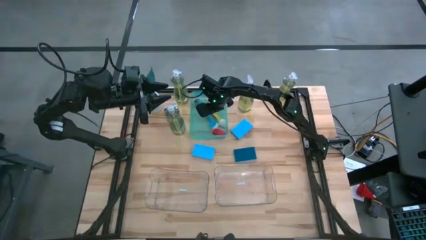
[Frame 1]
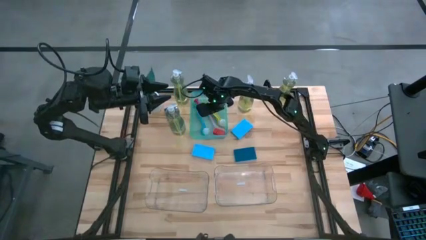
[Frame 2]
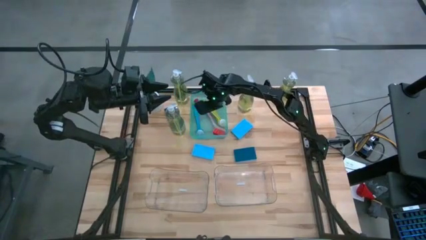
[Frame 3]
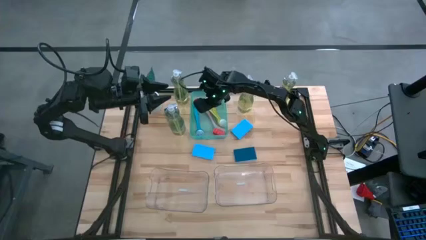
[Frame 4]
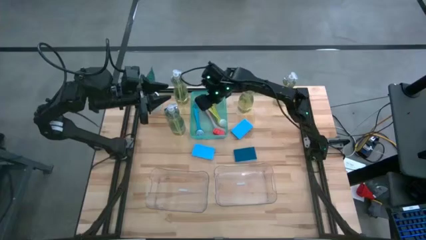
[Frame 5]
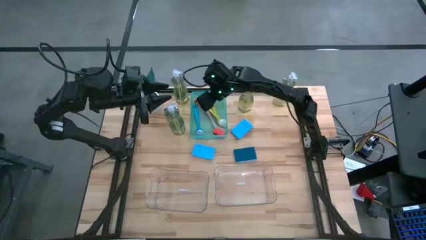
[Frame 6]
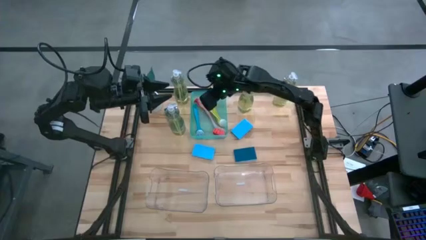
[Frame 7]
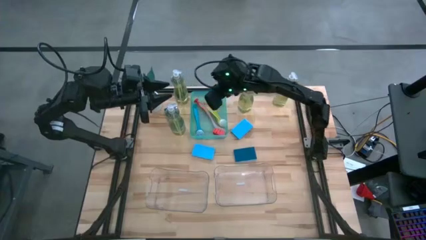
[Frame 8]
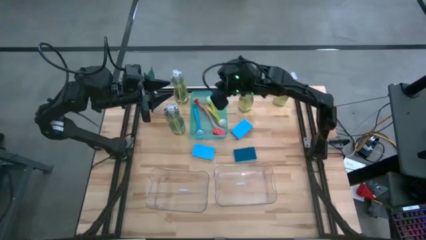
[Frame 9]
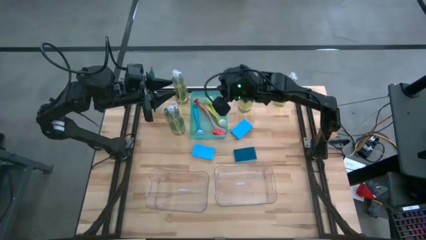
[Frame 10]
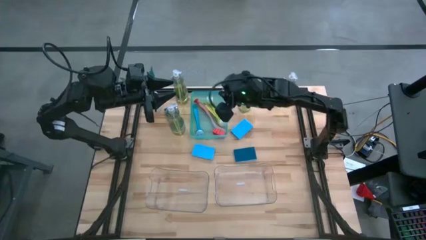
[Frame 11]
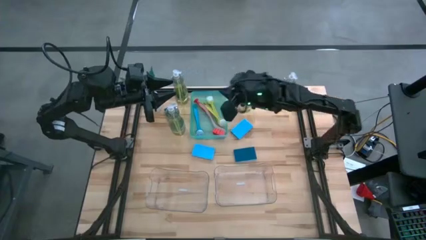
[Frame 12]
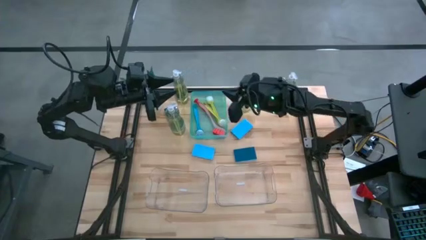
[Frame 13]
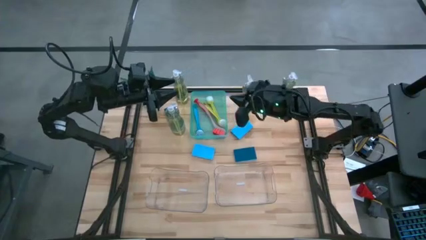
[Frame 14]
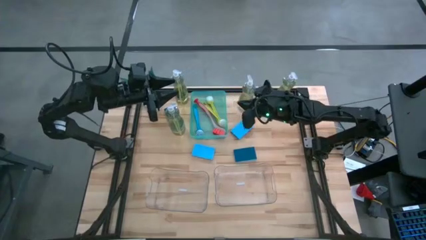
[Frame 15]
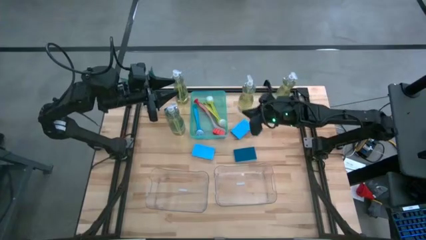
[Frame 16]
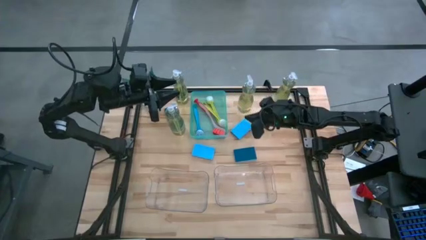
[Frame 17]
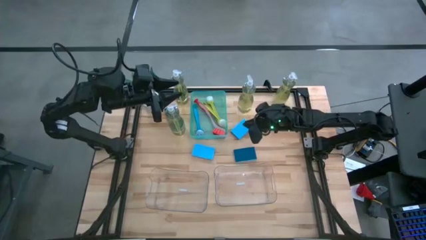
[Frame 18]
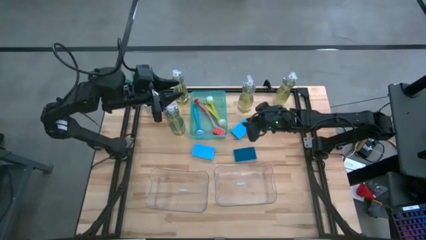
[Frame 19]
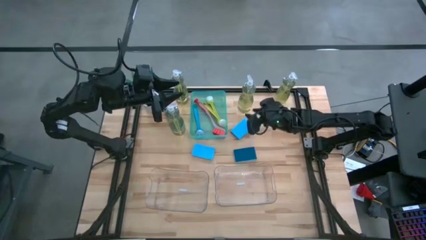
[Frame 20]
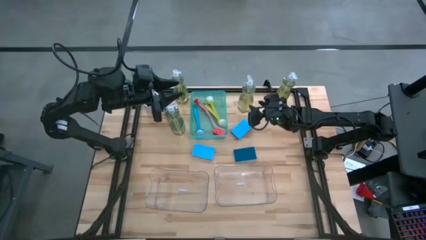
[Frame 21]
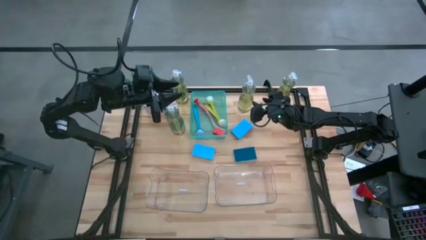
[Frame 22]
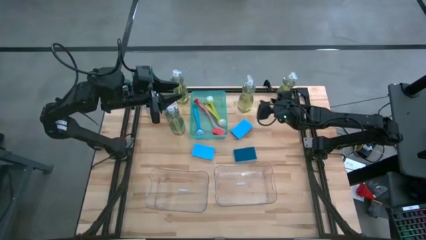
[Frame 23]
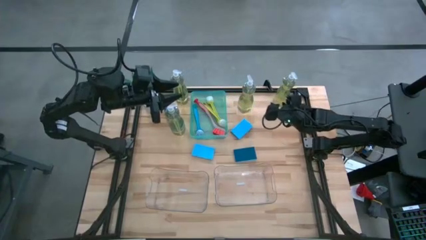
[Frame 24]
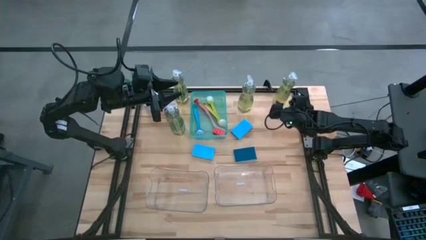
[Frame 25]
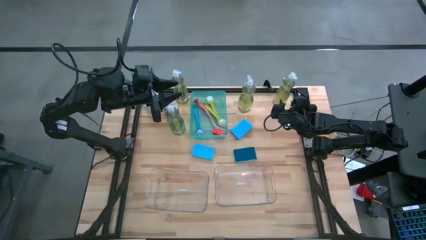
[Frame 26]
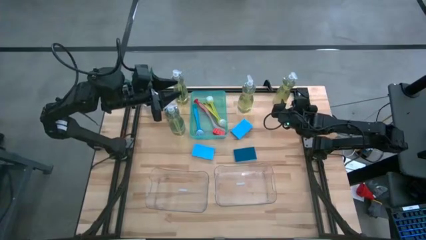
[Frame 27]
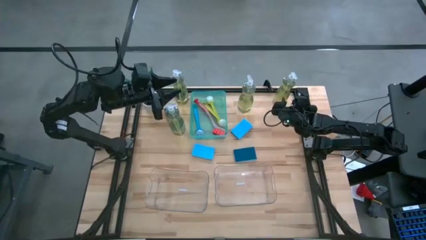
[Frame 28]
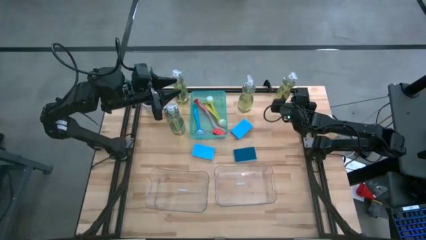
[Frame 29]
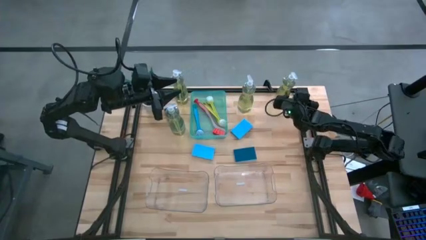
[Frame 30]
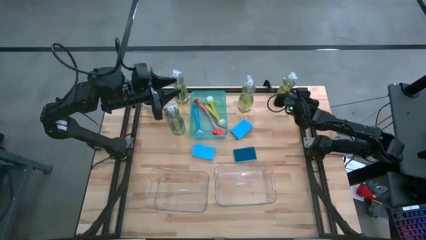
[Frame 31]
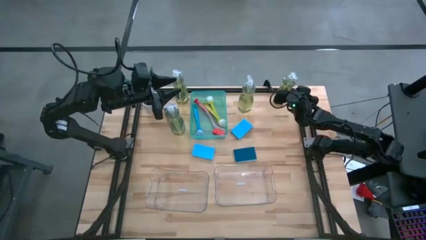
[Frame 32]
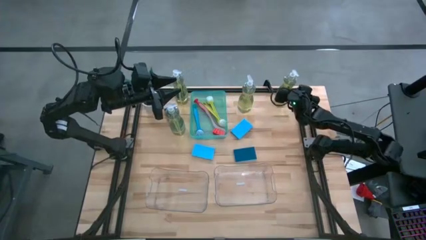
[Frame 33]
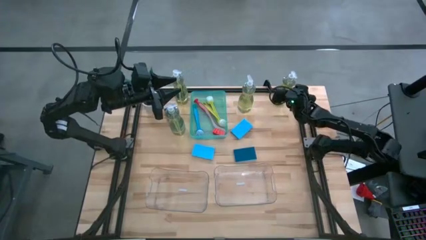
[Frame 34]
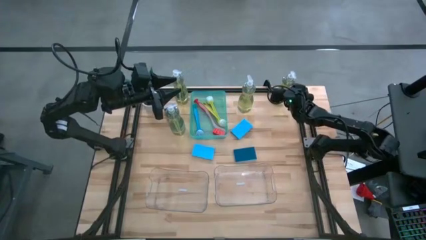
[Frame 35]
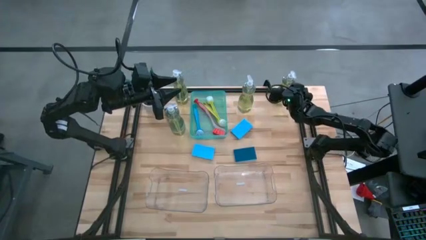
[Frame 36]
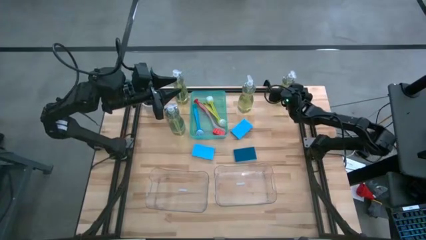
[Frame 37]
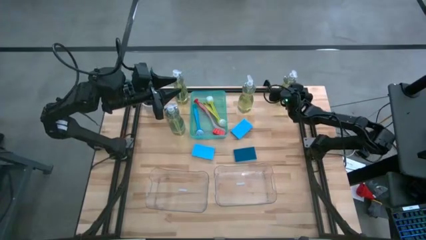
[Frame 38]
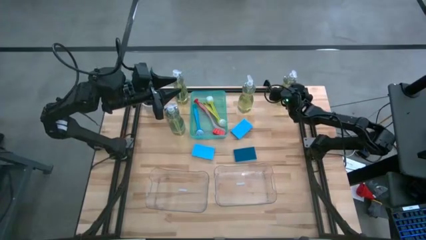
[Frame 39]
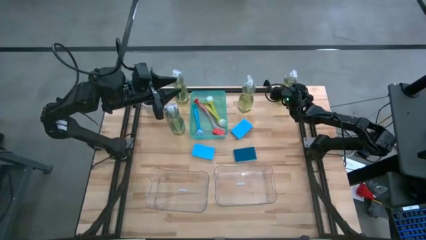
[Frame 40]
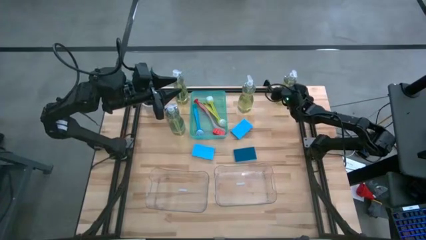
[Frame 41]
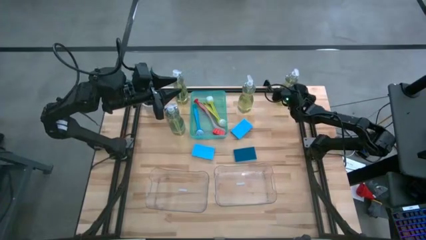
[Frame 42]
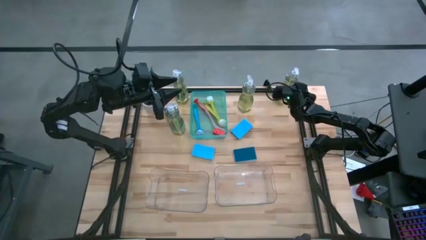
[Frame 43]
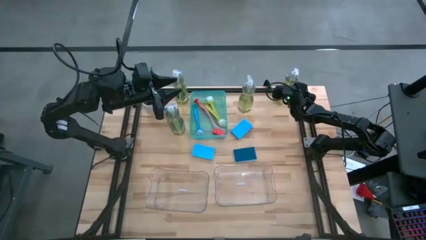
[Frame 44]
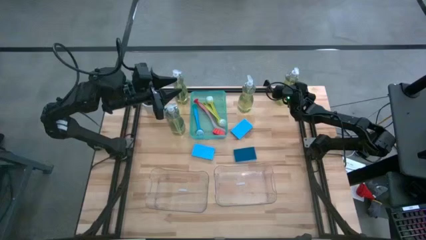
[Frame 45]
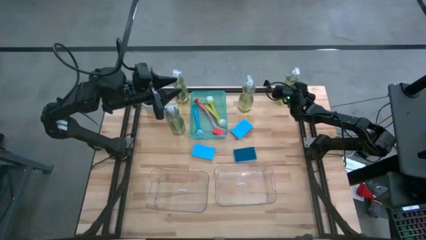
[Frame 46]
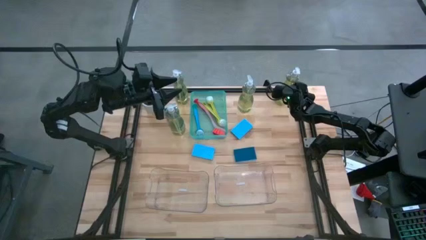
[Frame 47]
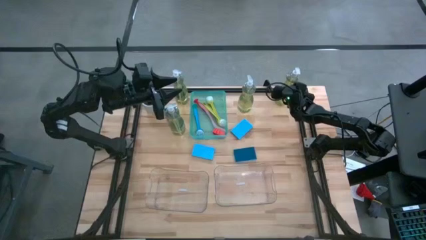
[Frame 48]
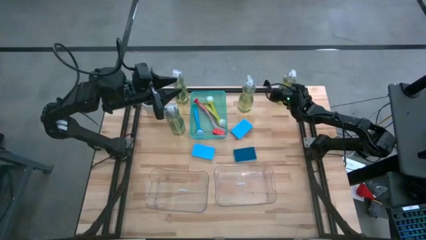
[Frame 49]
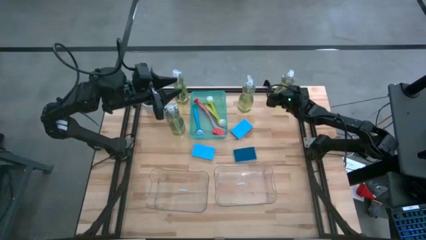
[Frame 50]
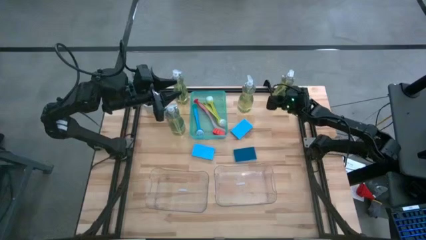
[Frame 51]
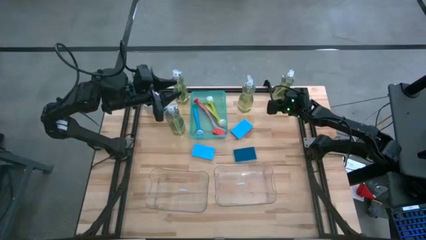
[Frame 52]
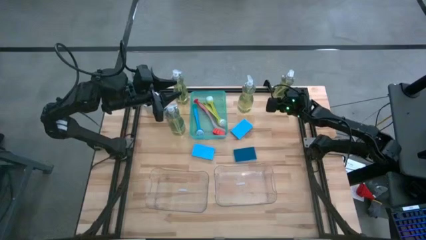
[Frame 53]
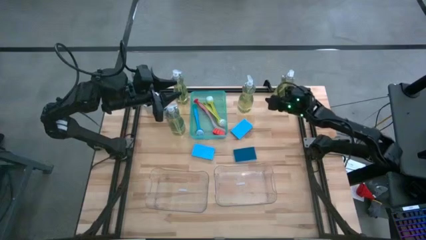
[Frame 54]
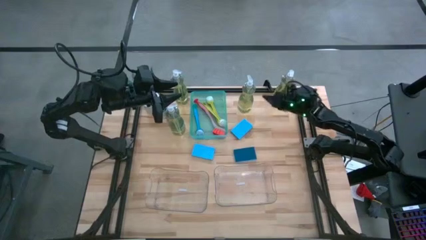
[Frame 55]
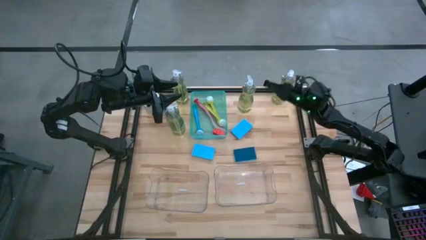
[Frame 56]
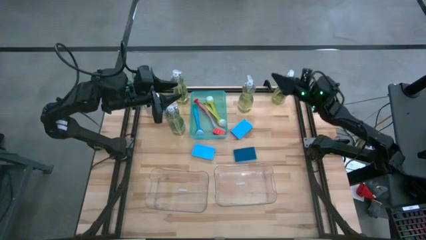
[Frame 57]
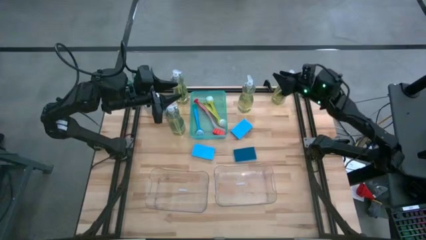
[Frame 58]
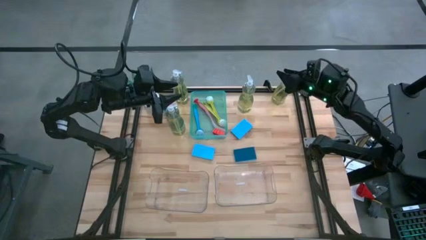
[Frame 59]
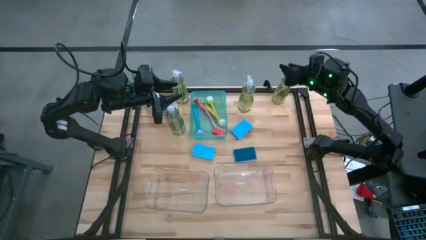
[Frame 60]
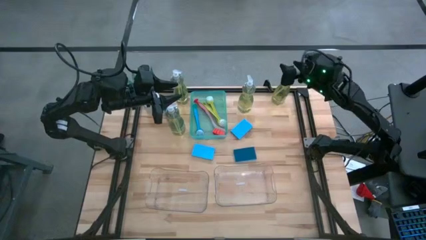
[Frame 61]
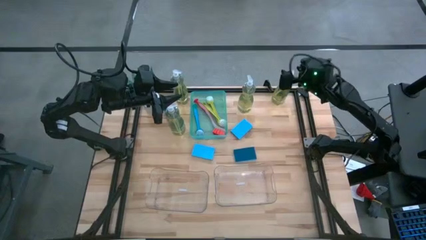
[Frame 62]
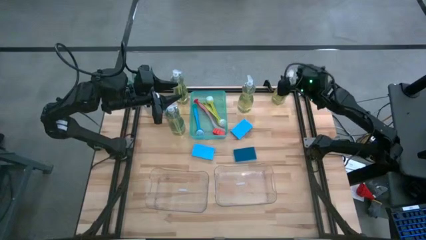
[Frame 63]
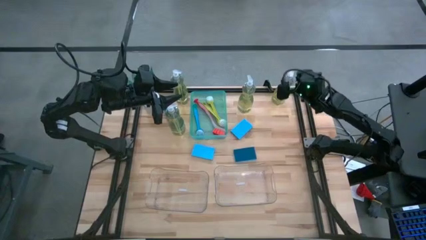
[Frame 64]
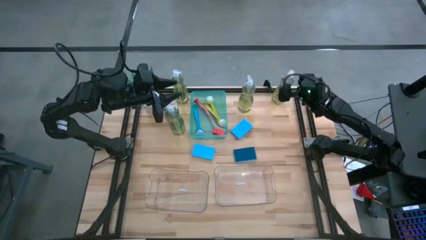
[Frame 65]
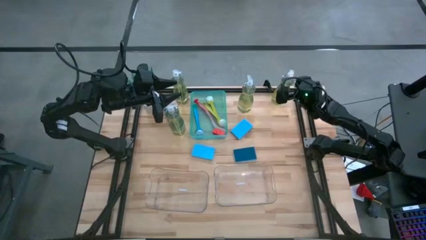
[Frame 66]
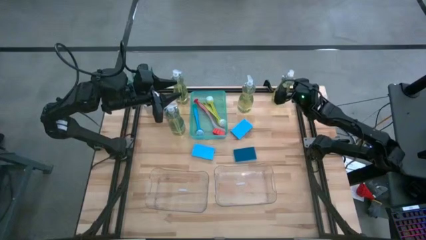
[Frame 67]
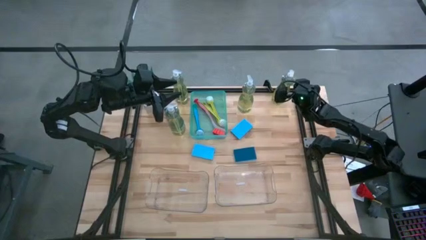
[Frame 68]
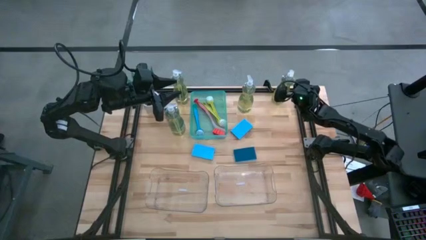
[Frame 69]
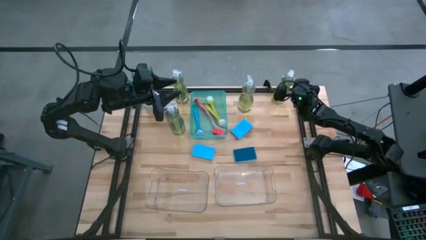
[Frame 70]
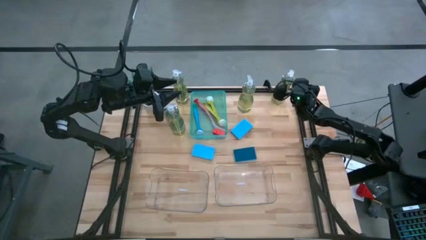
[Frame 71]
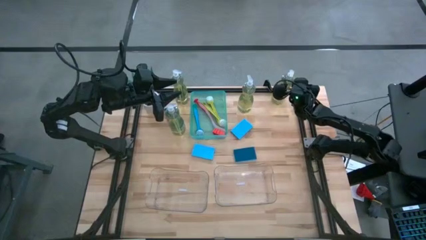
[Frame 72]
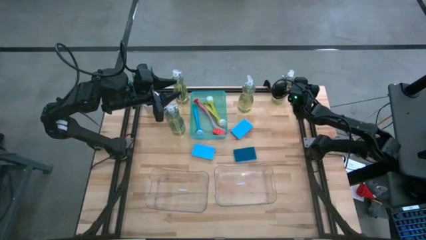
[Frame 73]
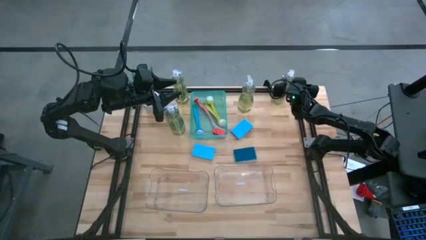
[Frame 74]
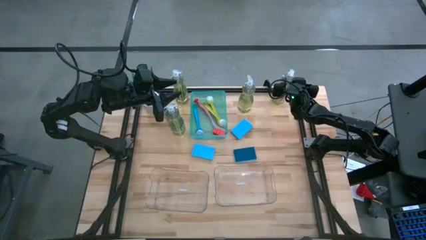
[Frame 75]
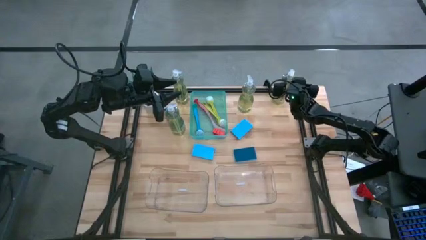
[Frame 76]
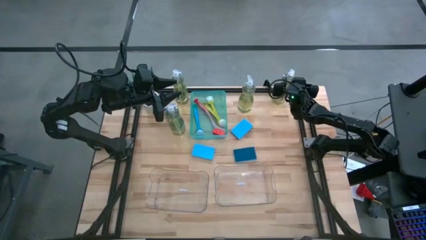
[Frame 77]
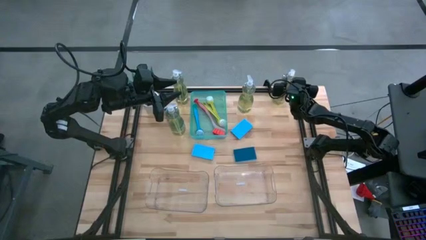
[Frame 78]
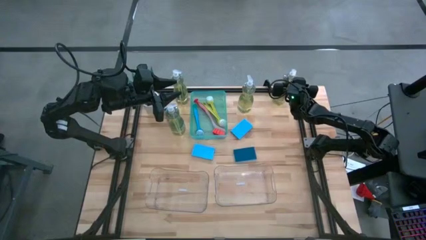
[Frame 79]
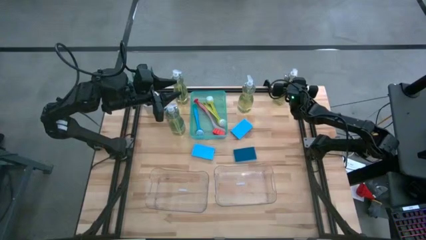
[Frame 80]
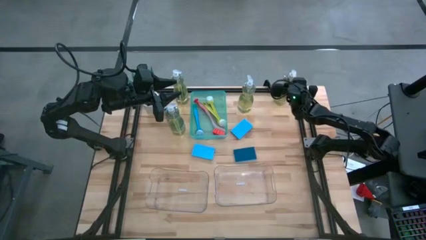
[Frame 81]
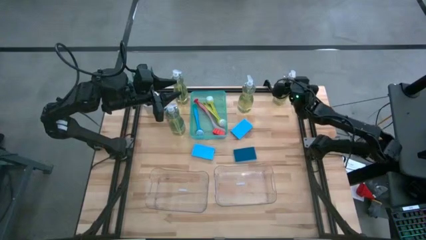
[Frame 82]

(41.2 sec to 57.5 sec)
Task: Pick & Place Kitchen Sink Supplies
Put the soap dispenser into the right transparent bin
